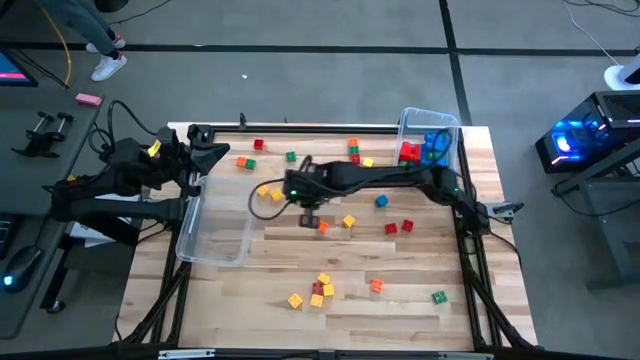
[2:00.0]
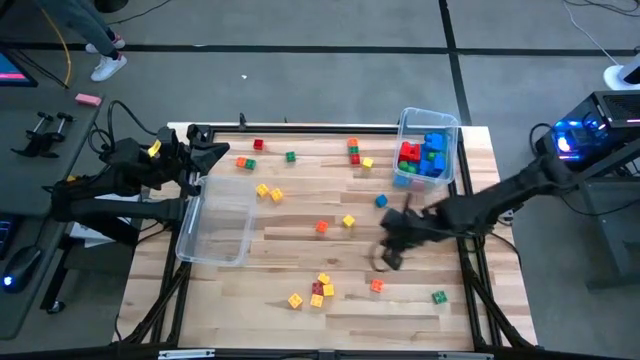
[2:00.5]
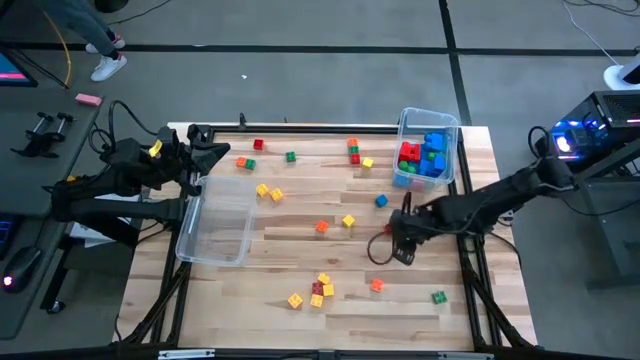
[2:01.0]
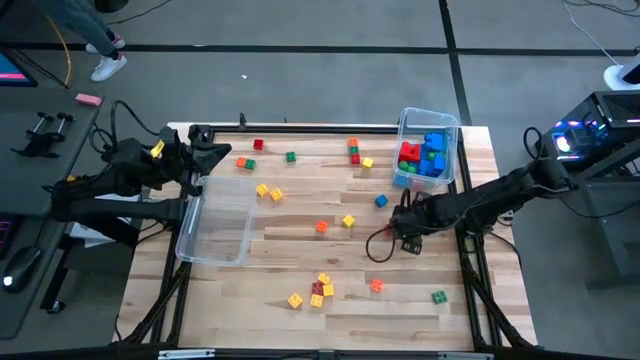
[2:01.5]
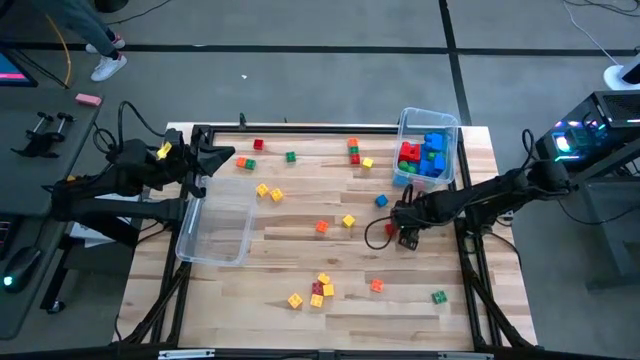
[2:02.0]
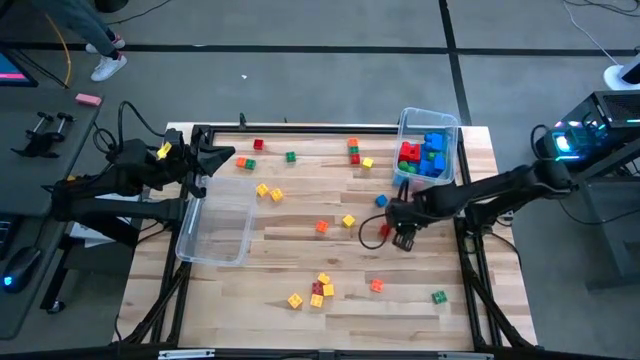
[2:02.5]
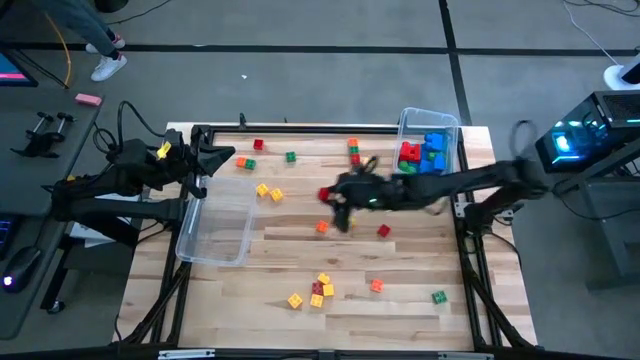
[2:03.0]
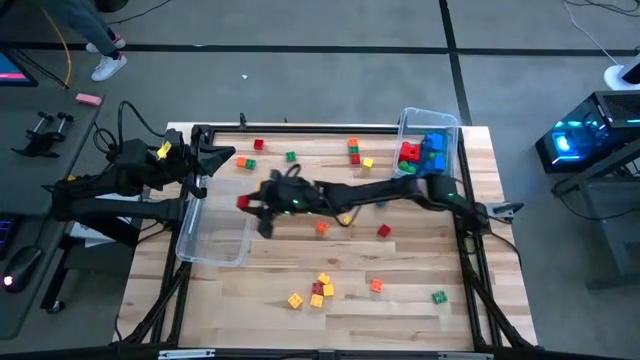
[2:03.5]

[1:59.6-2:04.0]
Task: Sort blocks by size
Put the small red game piece into the left transparent bin

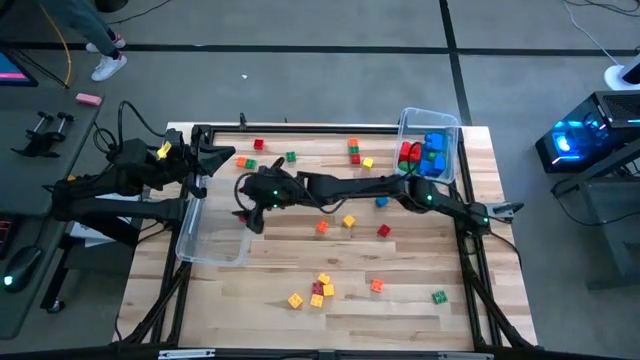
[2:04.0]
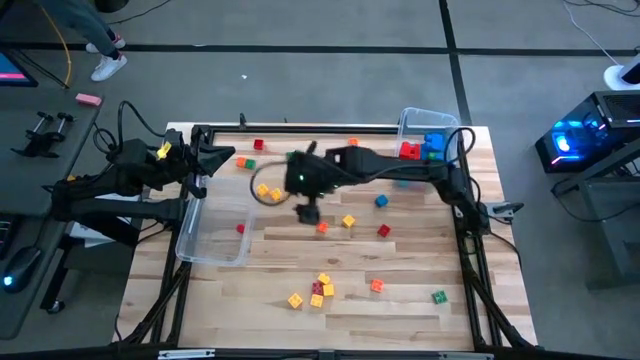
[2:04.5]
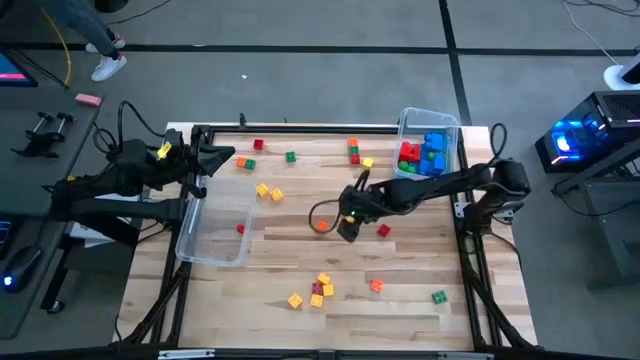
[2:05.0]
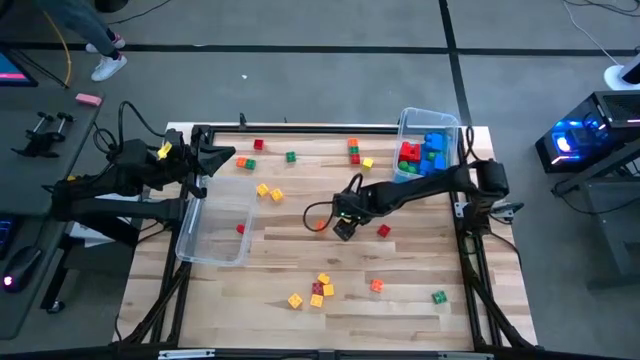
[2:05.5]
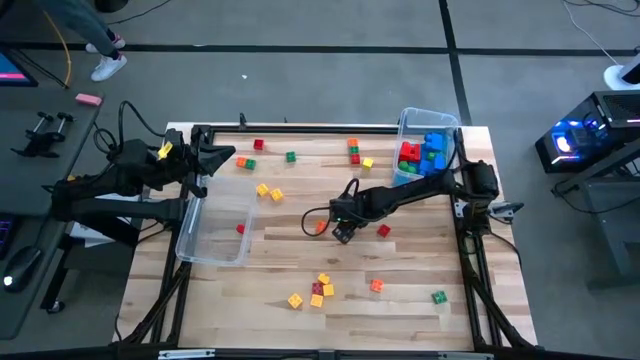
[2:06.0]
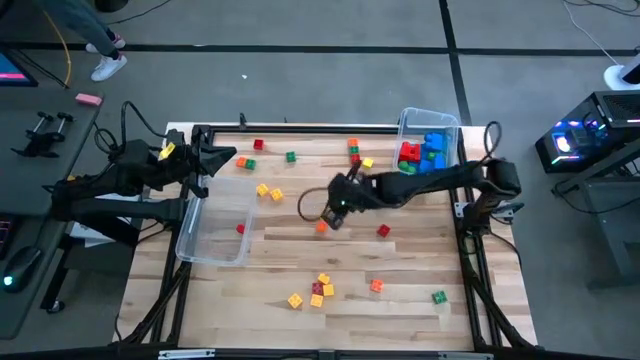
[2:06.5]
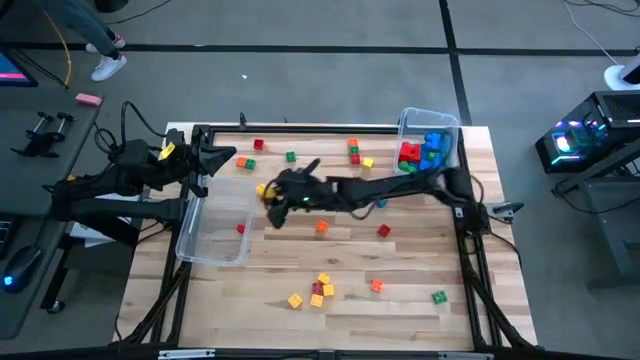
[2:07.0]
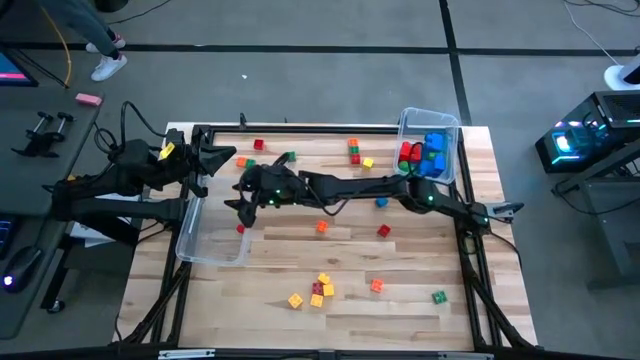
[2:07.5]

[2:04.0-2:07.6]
Put the small yellow block into the left transparent bin

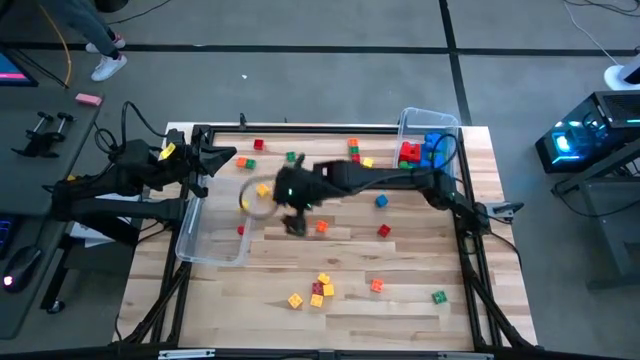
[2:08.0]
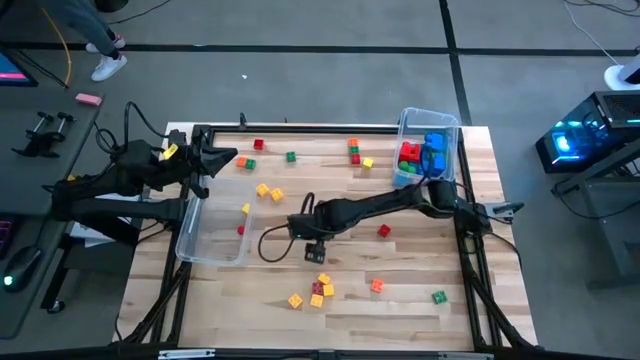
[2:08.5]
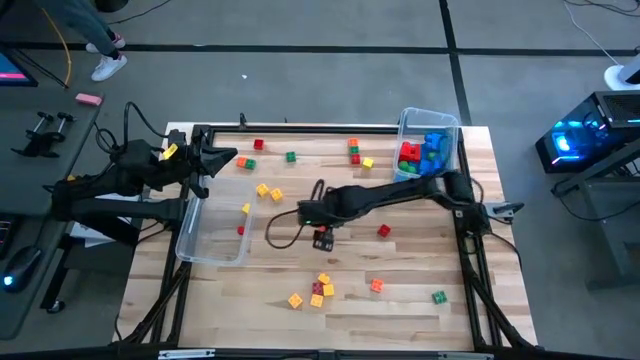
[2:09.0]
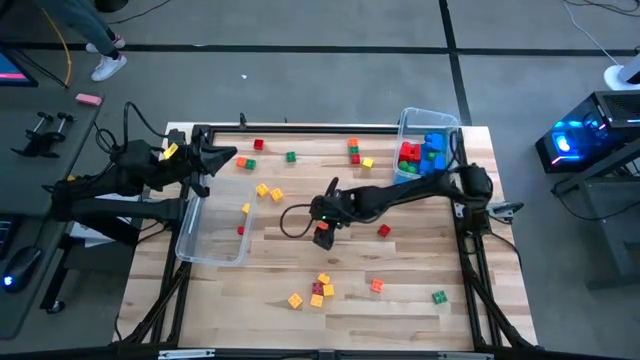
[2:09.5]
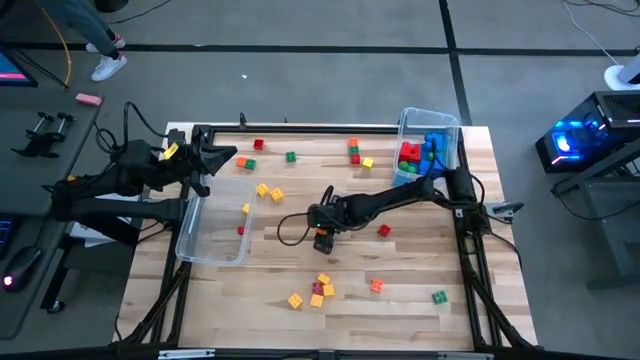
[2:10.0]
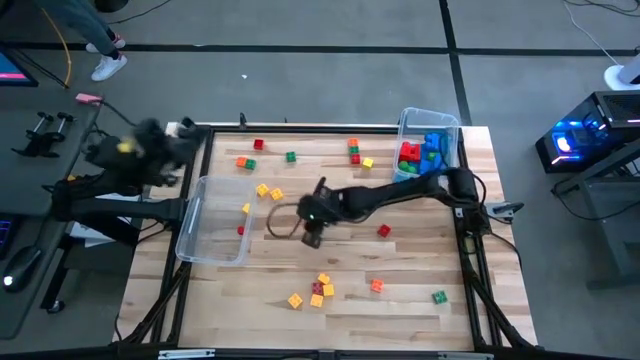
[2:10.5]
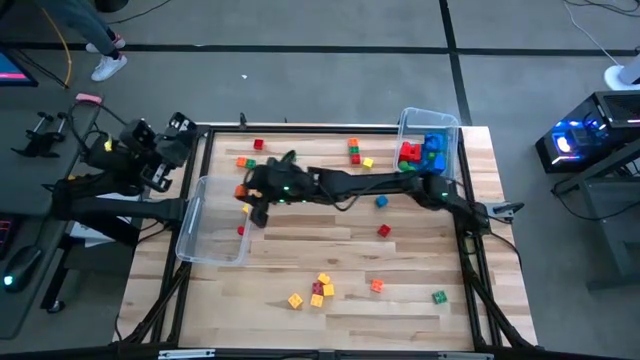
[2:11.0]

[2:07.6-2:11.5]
Put the small orange game piece into the left transparent bin

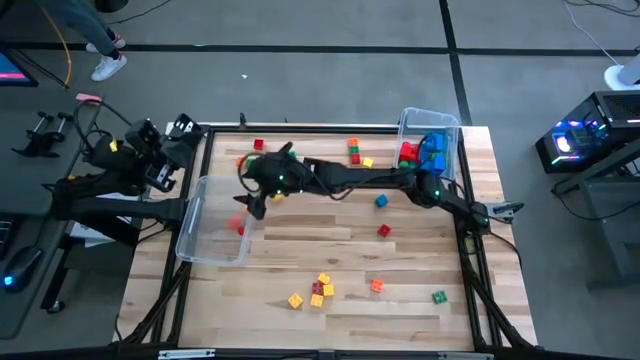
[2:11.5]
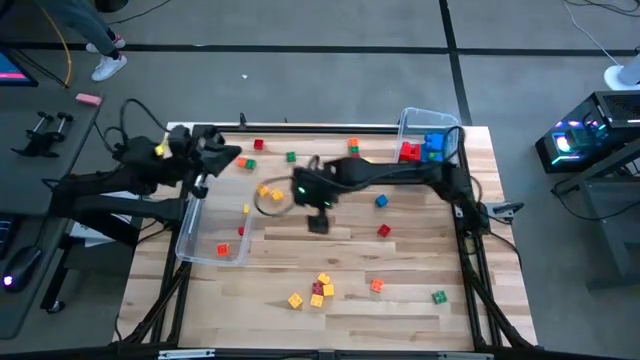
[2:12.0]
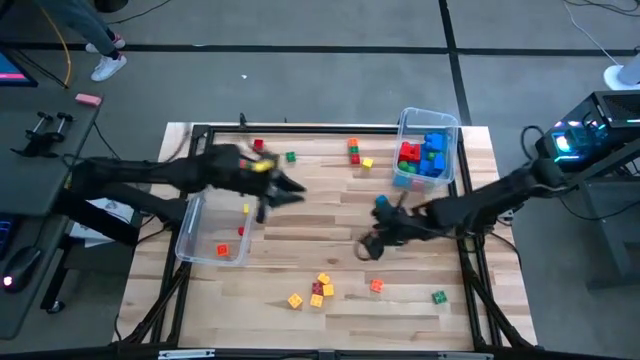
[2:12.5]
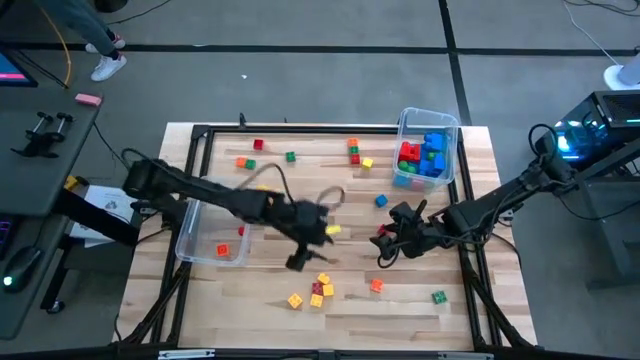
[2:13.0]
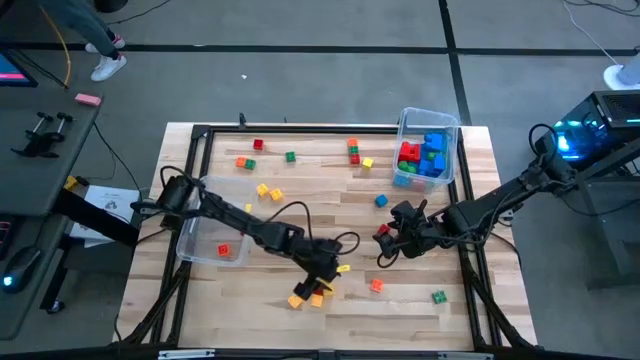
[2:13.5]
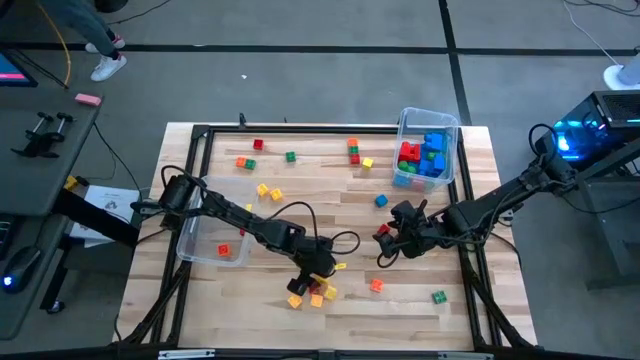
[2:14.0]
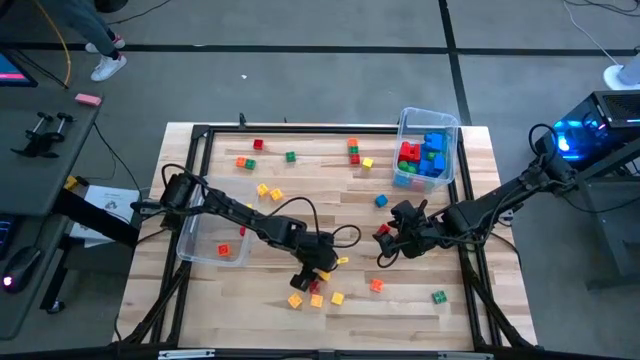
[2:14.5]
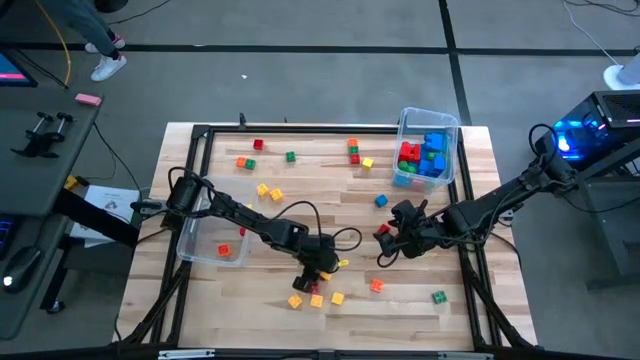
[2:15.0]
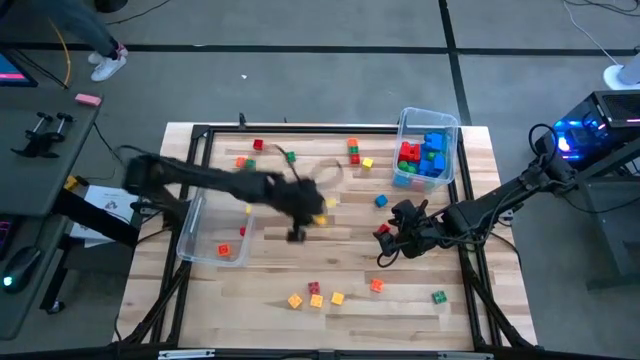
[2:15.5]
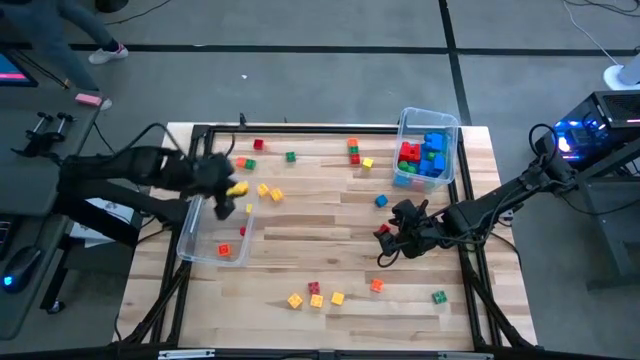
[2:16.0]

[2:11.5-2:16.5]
Put the small yellow game piece into the left transparent bin

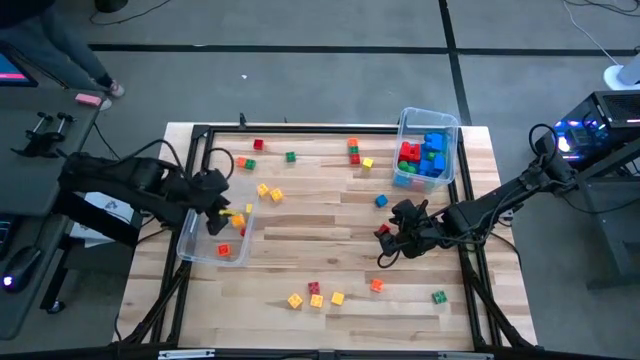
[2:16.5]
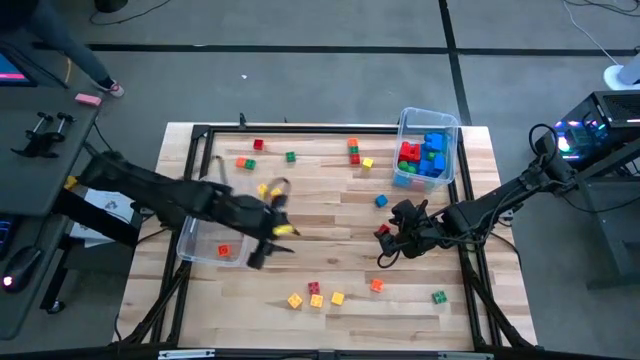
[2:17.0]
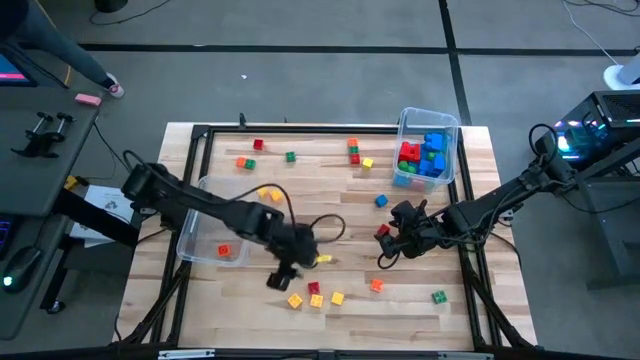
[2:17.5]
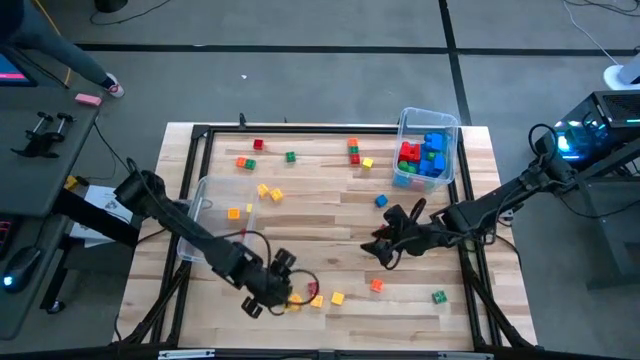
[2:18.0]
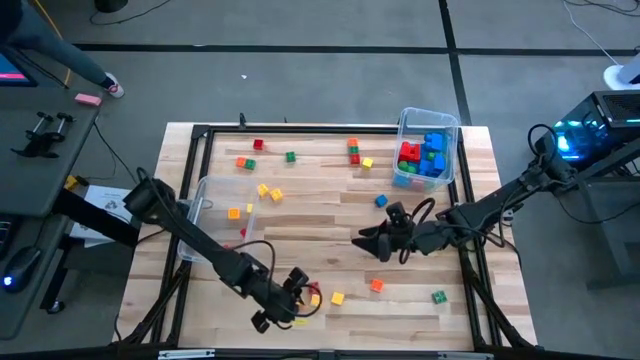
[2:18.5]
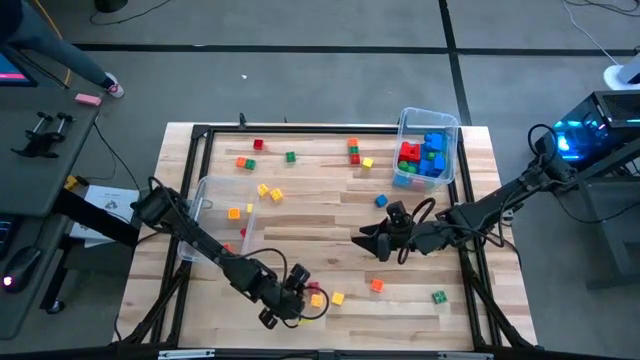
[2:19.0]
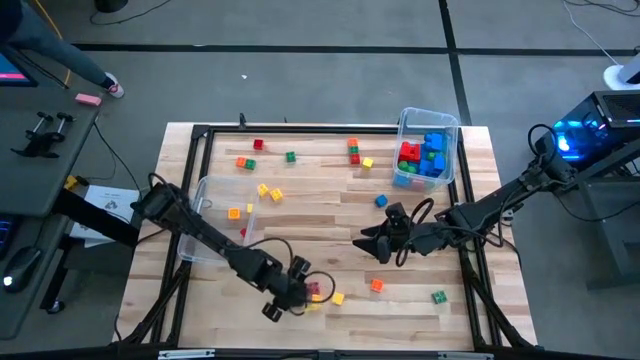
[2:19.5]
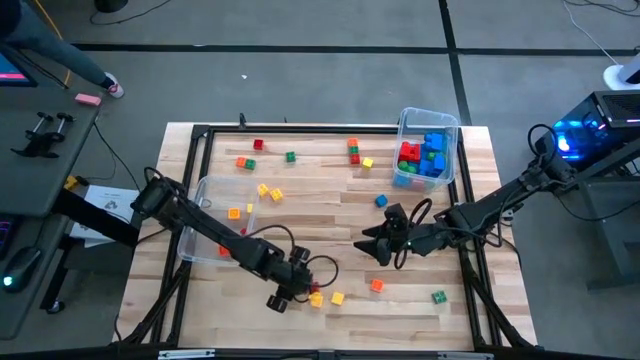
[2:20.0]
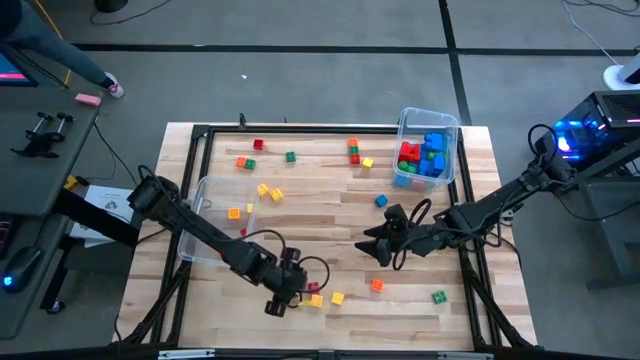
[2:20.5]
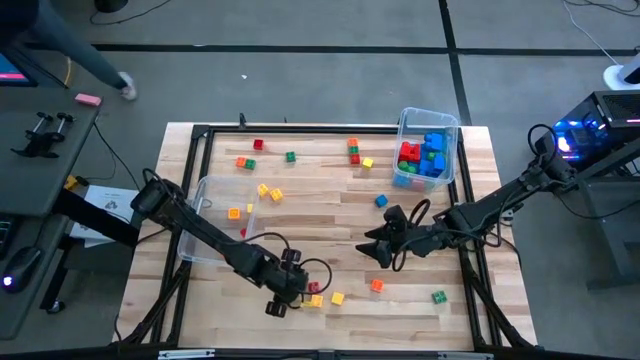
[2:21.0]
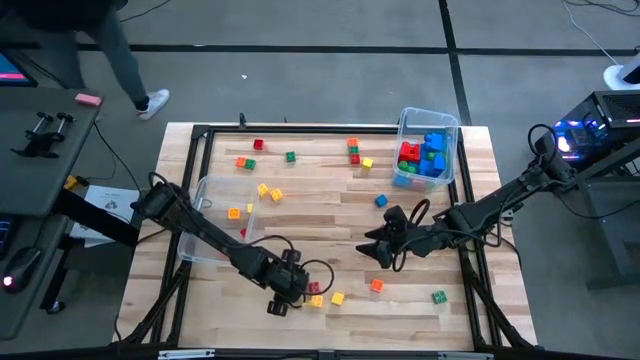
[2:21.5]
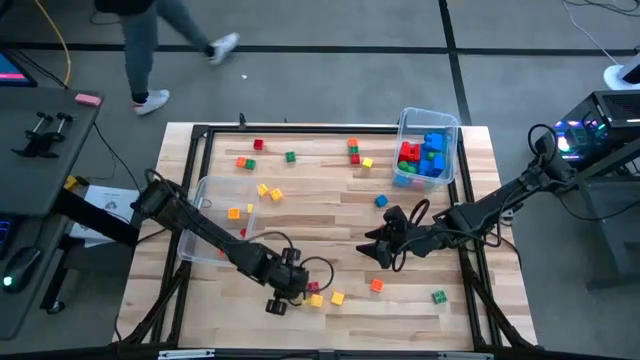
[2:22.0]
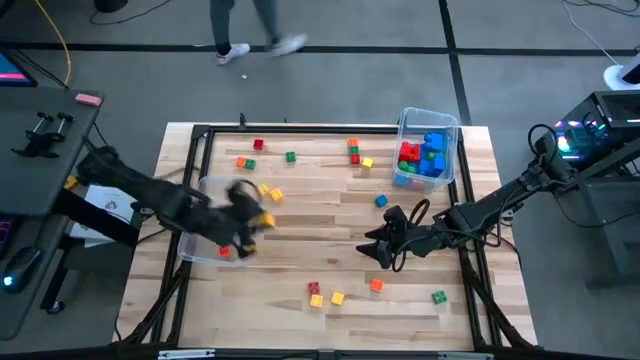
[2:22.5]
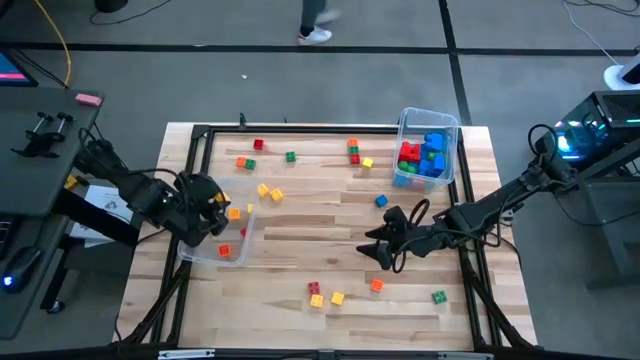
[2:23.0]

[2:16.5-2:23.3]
Put the small yellow game piece into the left transparent bin
